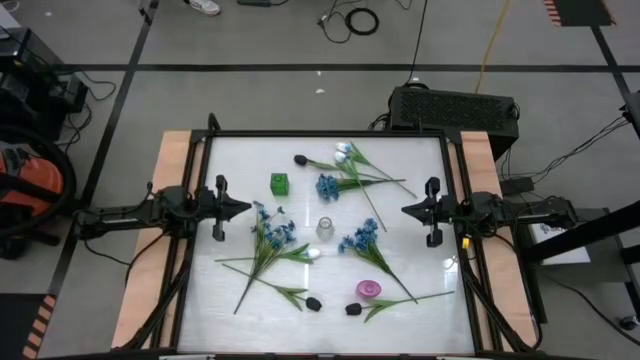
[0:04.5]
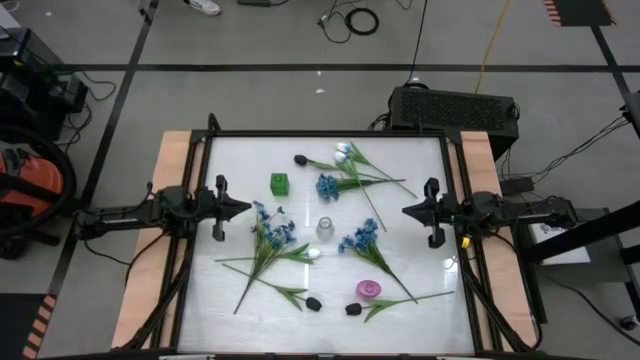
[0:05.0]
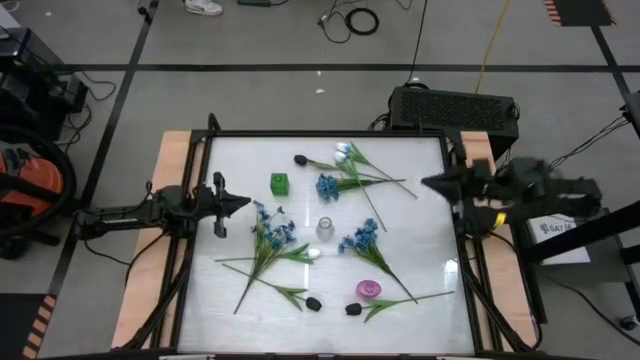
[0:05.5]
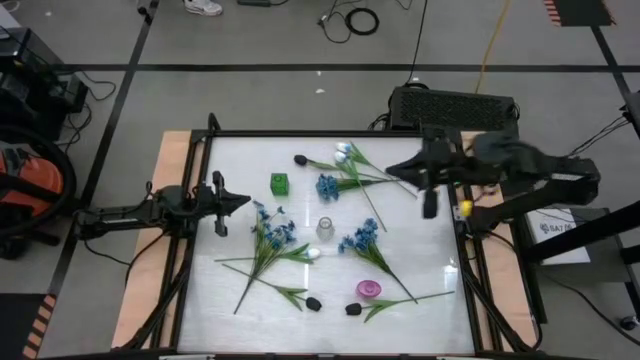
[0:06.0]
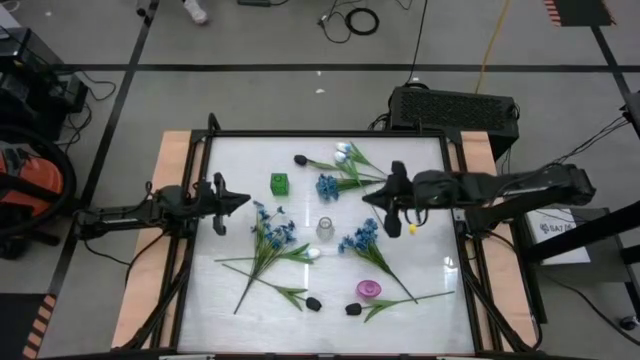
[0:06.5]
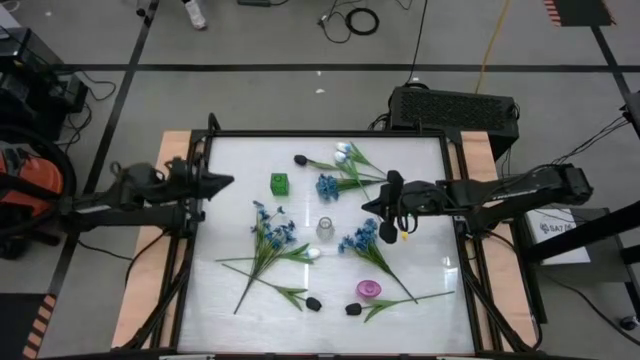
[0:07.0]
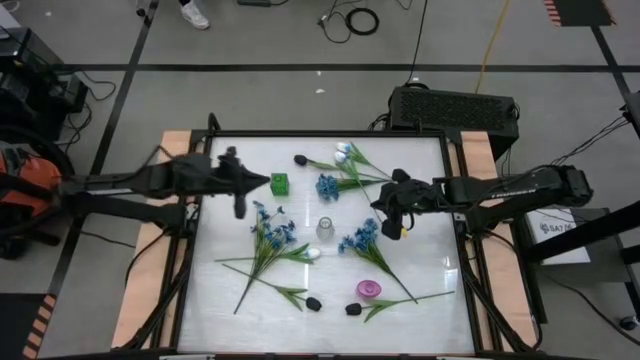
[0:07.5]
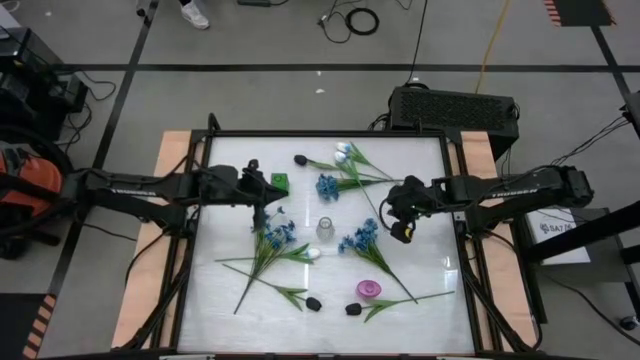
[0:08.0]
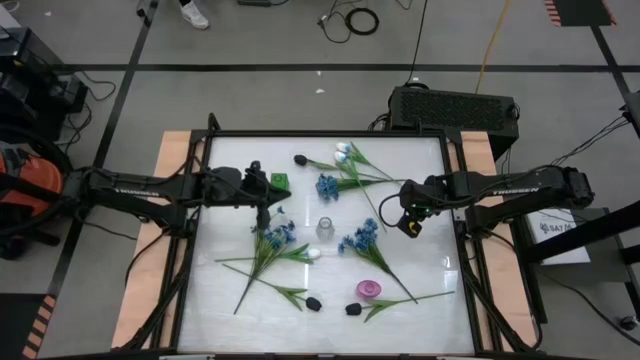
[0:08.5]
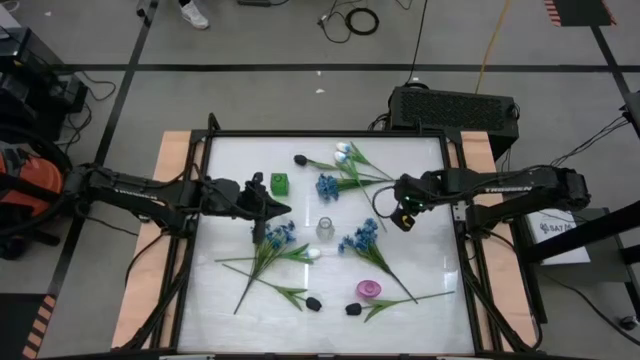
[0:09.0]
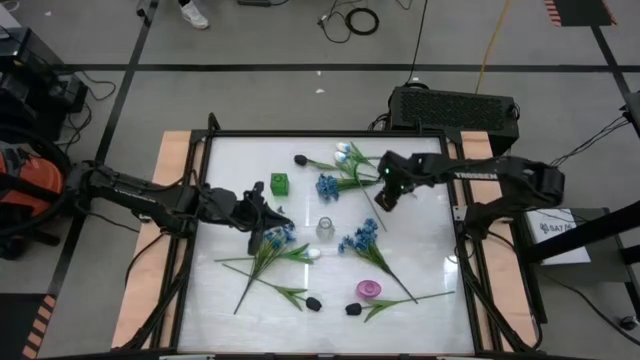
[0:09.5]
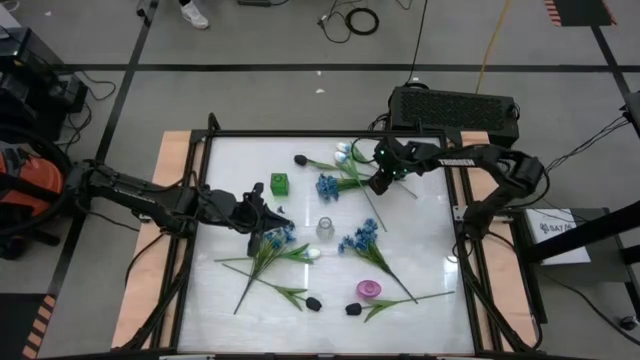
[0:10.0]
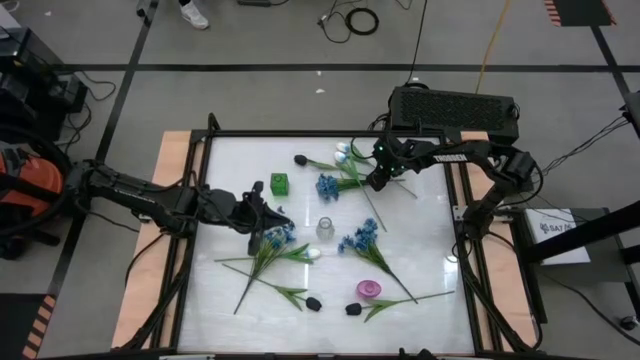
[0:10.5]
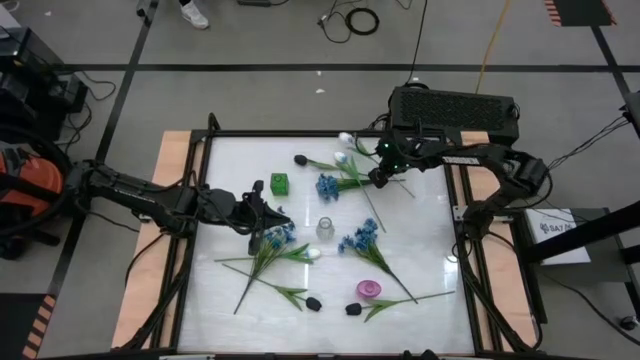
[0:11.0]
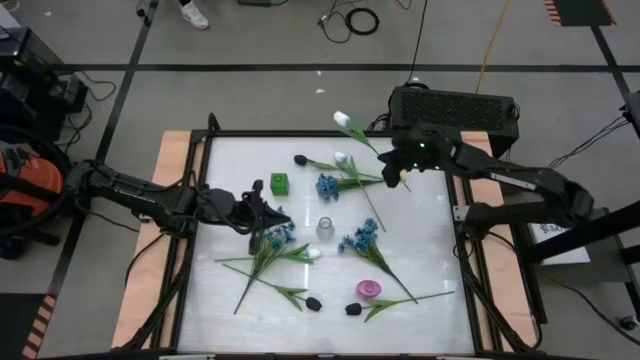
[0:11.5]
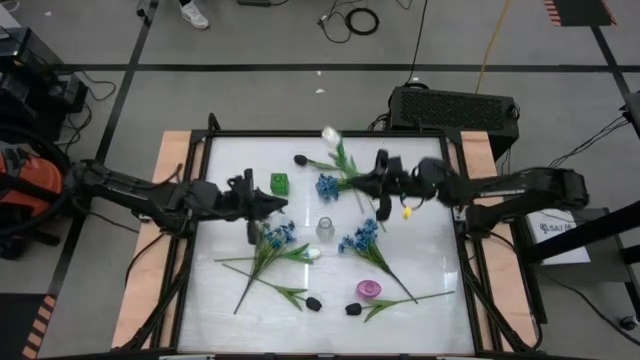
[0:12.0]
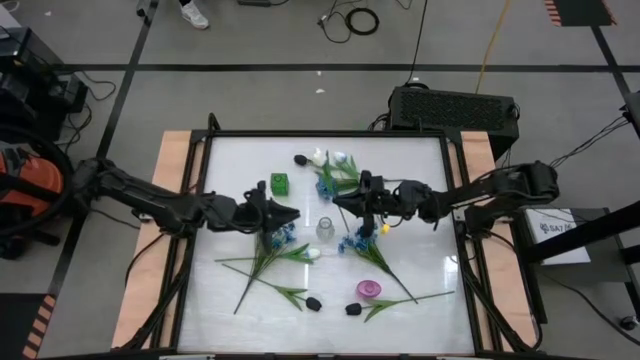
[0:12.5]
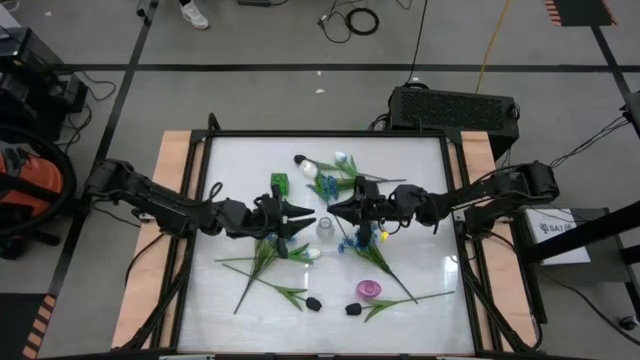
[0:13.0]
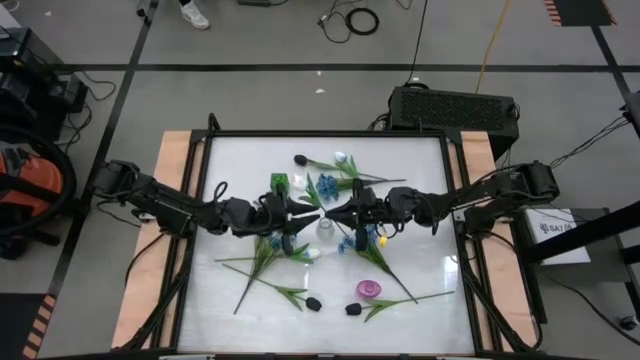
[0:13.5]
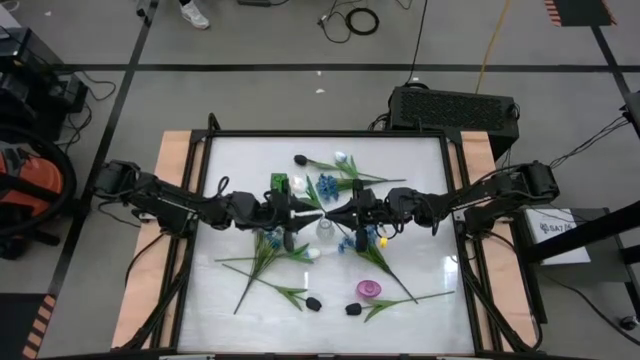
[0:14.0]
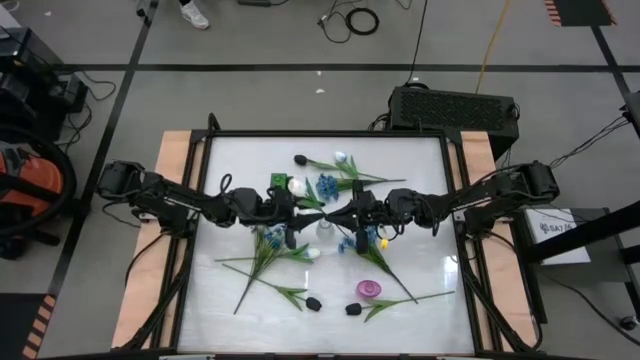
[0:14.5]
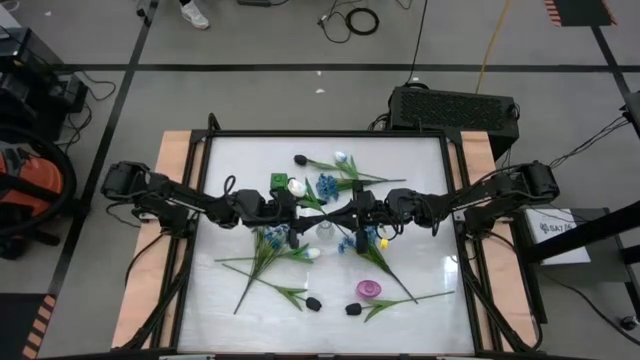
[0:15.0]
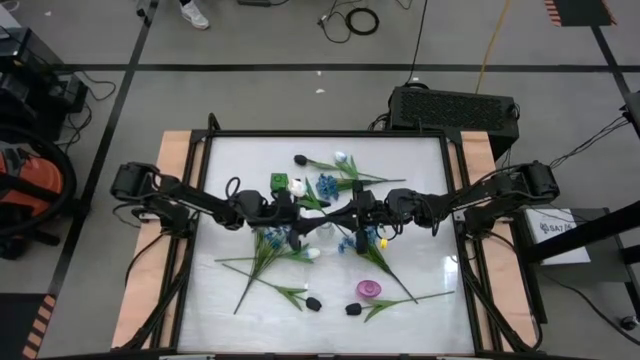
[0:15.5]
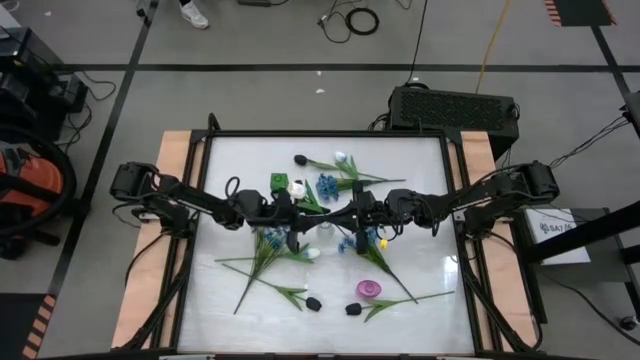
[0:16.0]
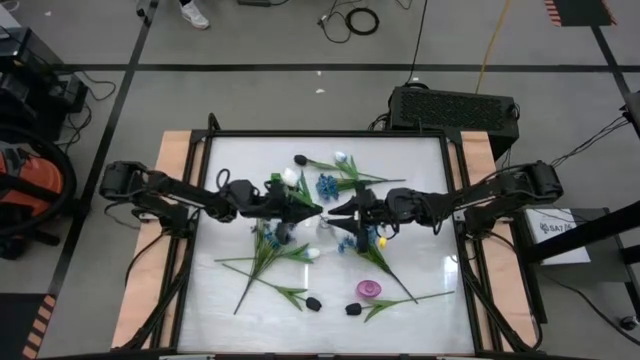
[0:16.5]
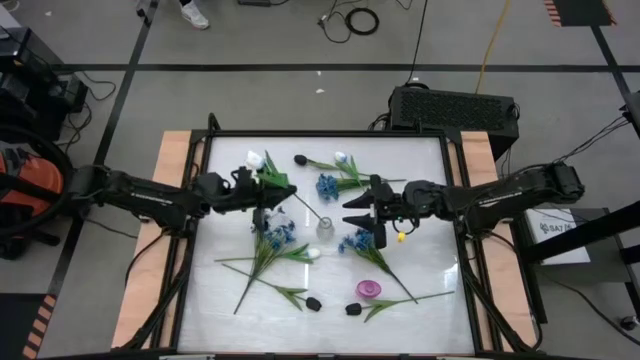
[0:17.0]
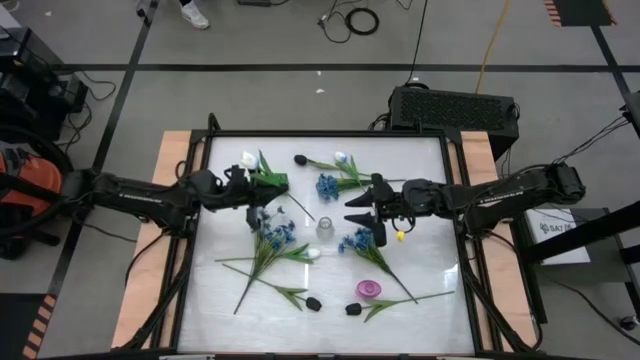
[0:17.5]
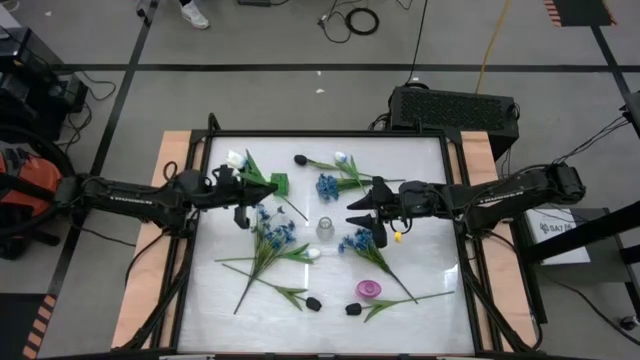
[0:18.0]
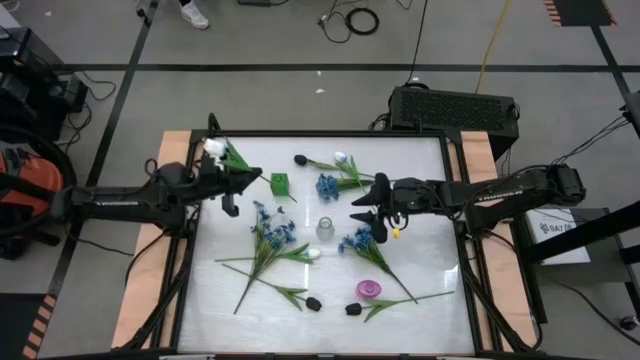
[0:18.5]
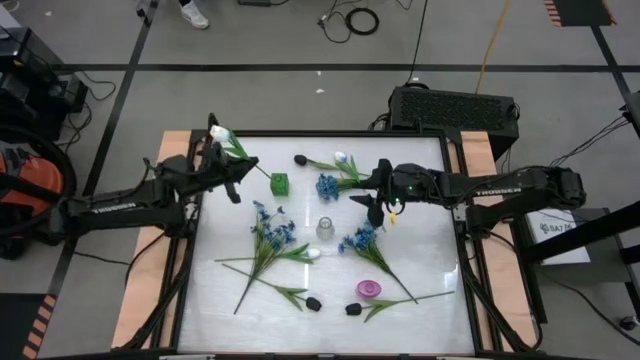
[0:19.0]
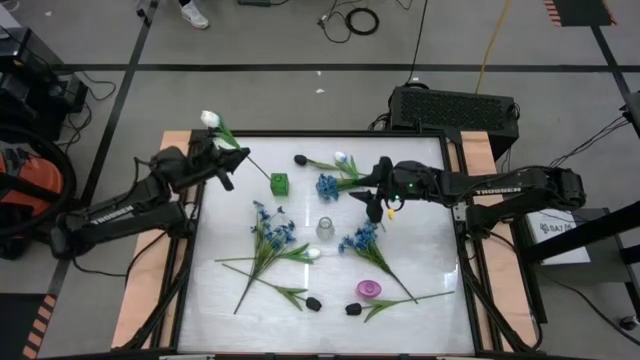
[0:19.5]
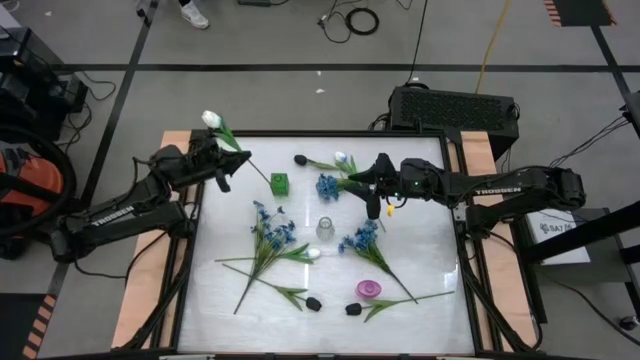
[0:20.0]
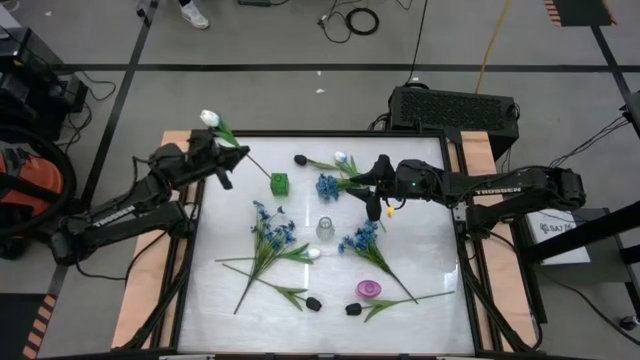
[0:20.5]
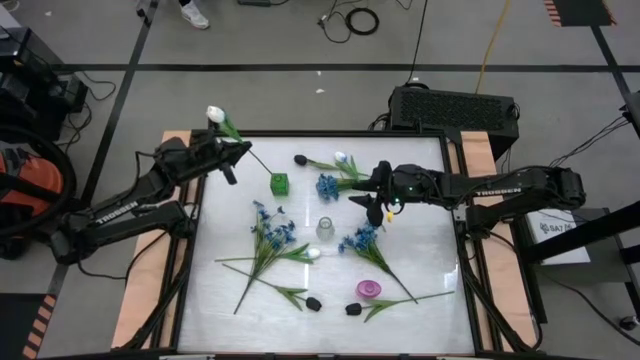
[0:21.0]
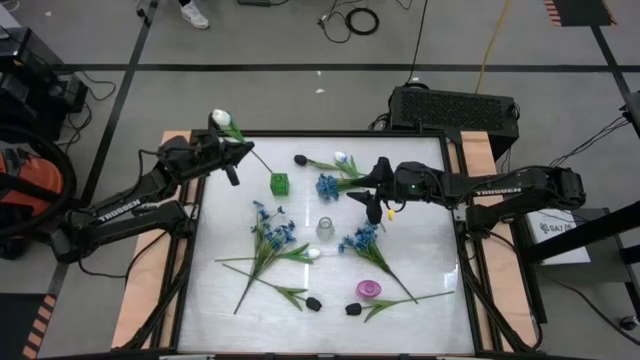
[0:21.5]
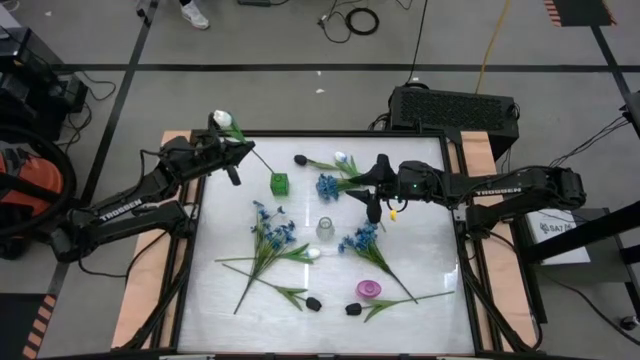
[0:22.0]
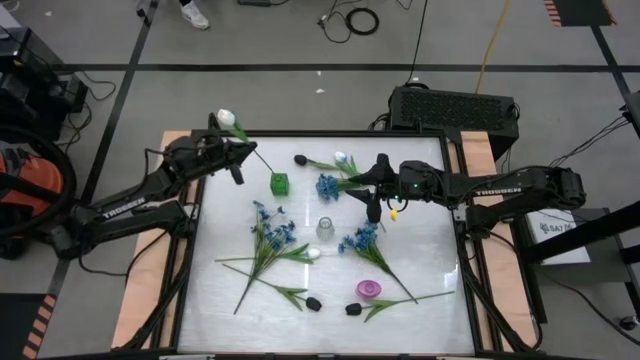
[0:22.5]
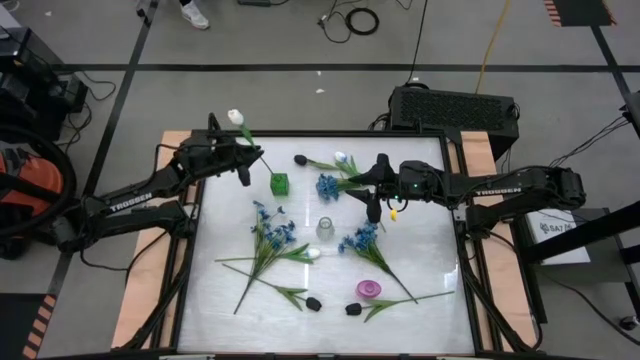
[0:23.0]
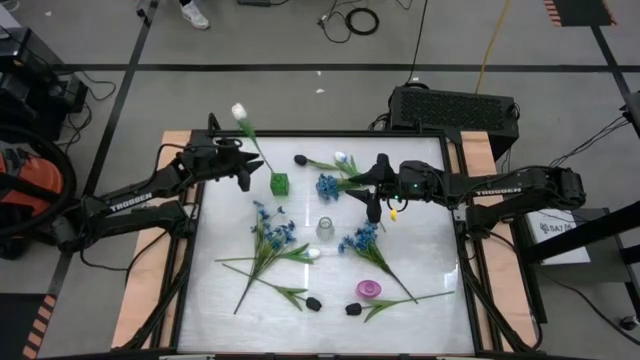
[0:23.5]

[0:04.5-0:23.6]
Task: Sort flowers into vase by color
Put the top white flower into the green vase
